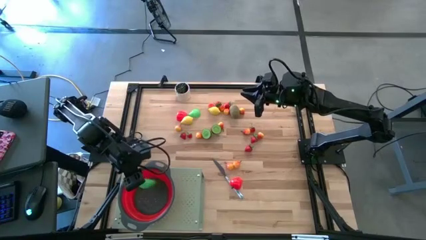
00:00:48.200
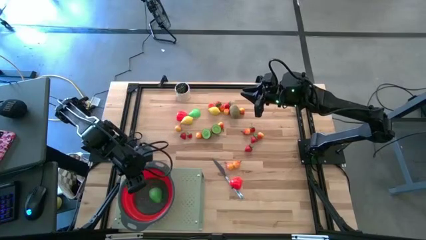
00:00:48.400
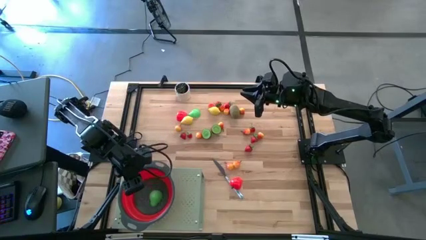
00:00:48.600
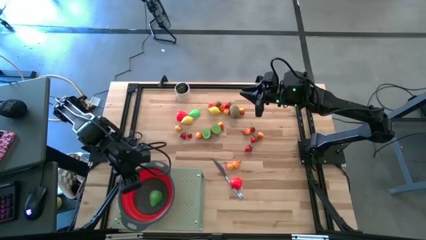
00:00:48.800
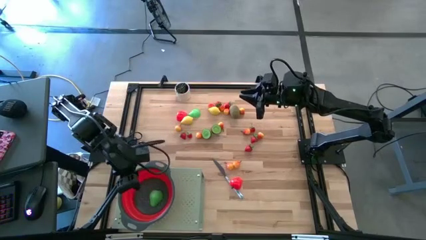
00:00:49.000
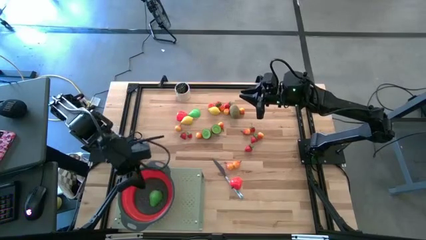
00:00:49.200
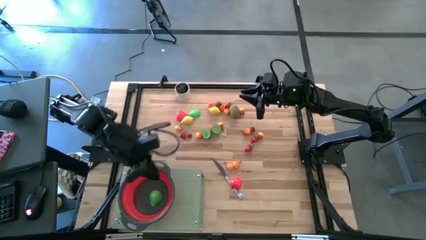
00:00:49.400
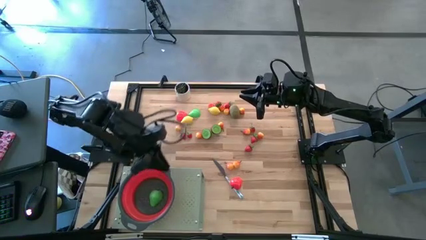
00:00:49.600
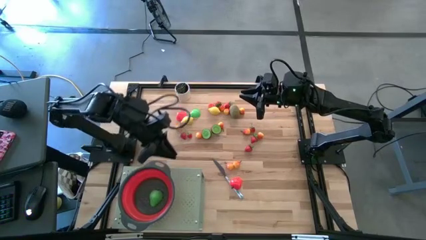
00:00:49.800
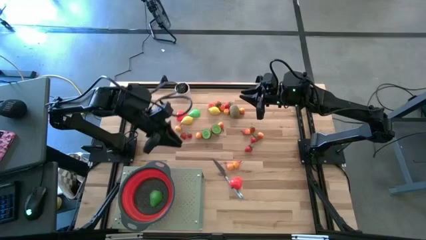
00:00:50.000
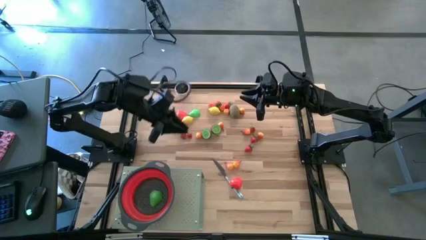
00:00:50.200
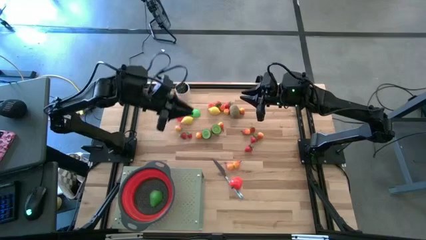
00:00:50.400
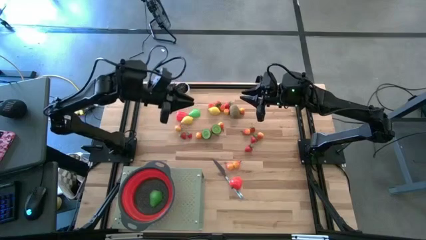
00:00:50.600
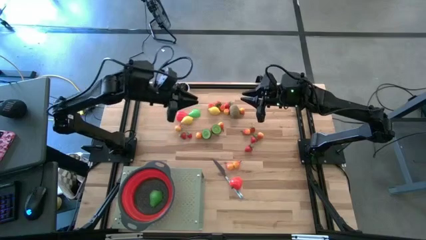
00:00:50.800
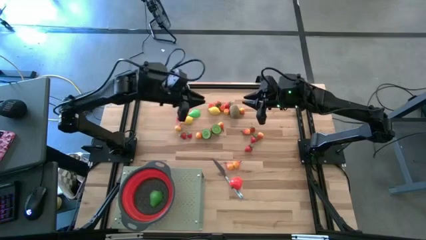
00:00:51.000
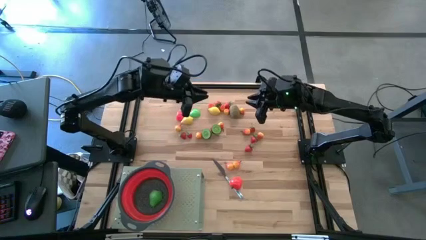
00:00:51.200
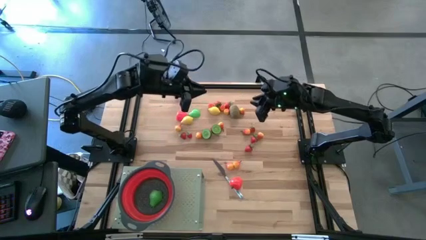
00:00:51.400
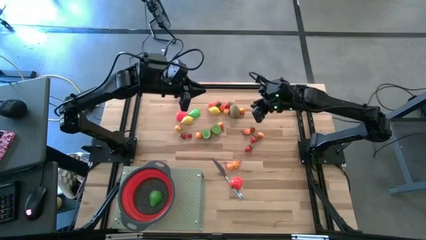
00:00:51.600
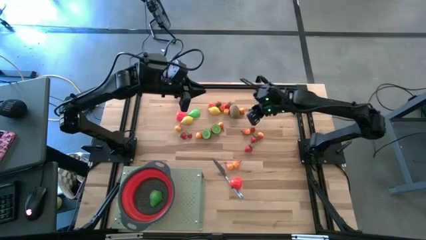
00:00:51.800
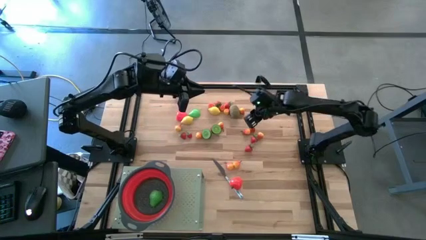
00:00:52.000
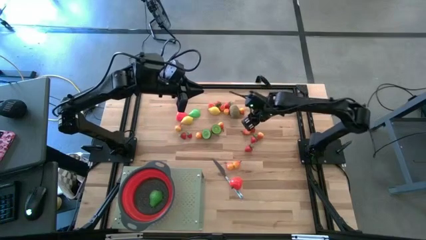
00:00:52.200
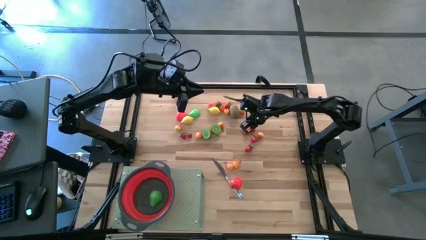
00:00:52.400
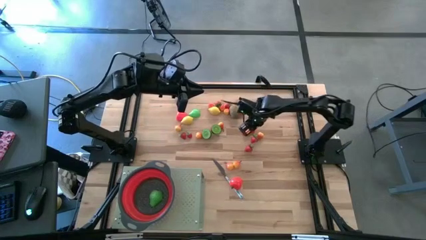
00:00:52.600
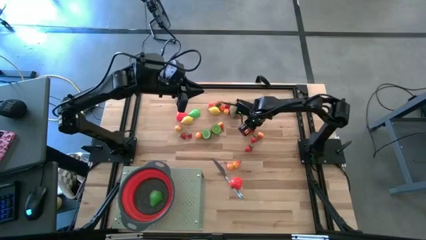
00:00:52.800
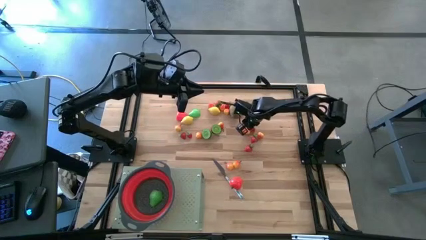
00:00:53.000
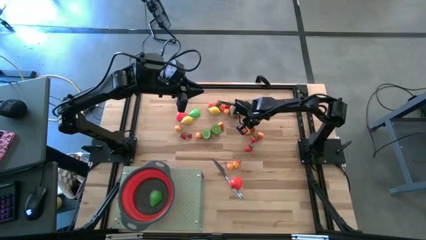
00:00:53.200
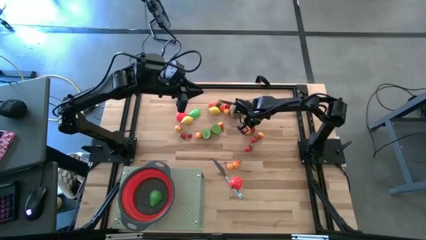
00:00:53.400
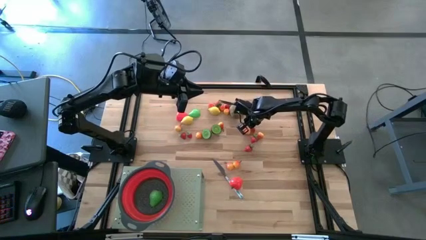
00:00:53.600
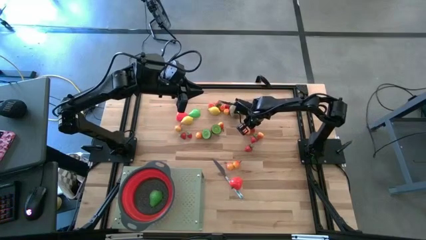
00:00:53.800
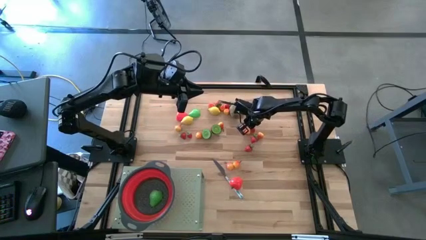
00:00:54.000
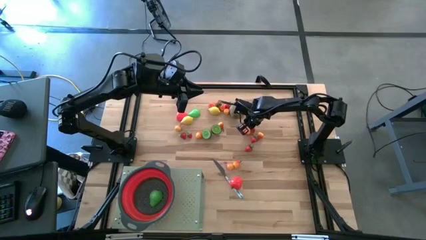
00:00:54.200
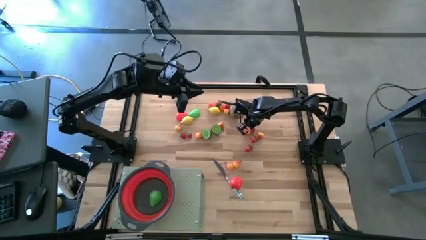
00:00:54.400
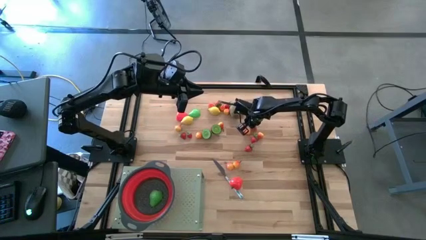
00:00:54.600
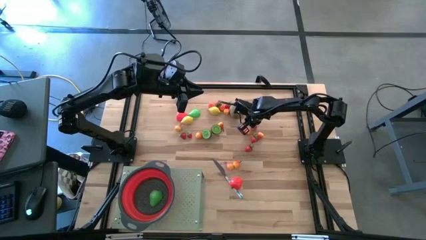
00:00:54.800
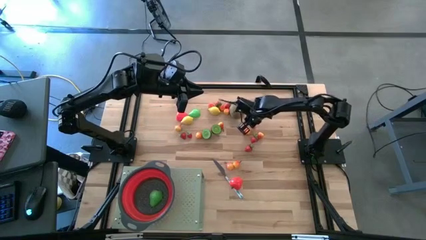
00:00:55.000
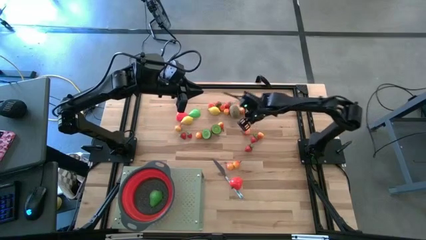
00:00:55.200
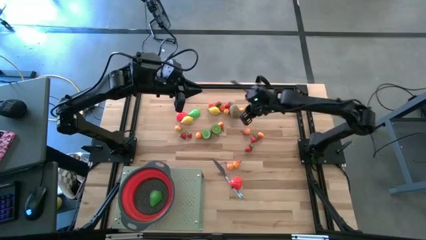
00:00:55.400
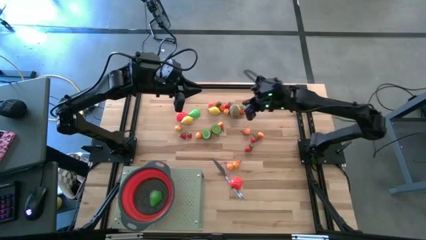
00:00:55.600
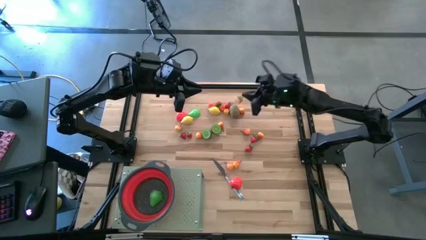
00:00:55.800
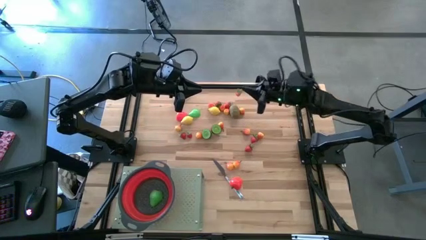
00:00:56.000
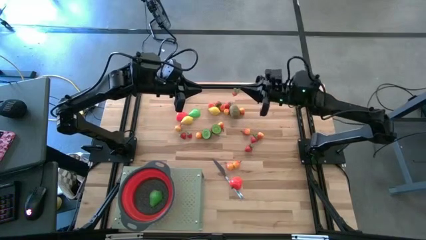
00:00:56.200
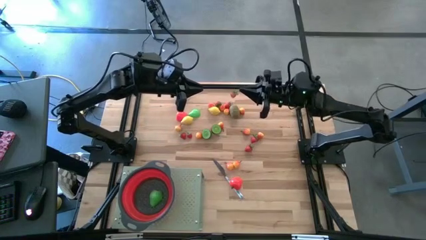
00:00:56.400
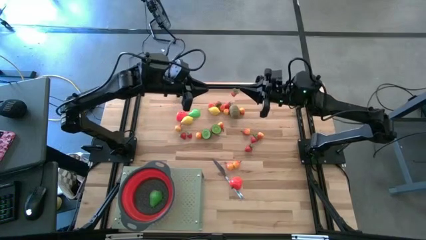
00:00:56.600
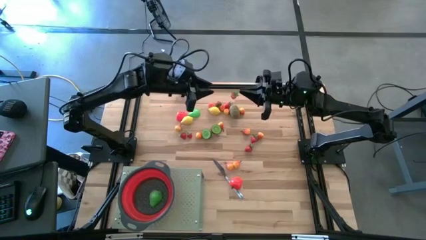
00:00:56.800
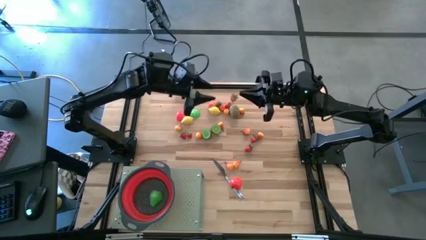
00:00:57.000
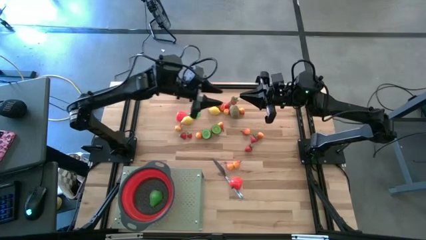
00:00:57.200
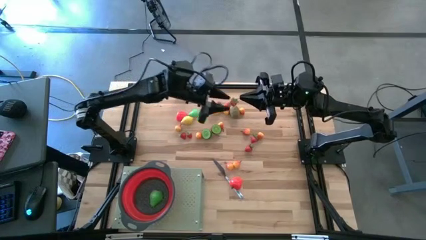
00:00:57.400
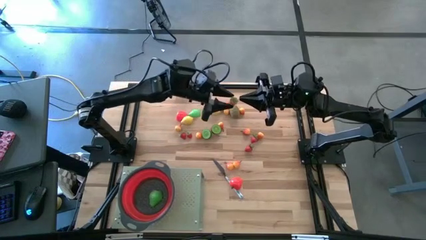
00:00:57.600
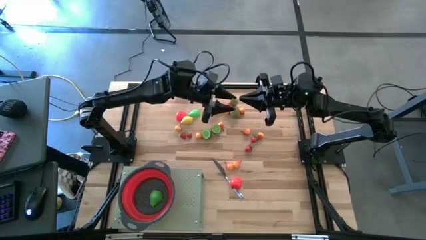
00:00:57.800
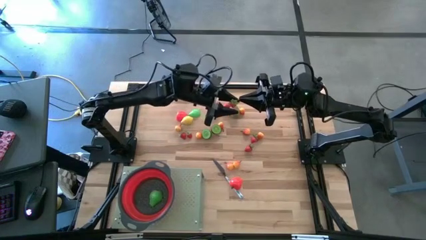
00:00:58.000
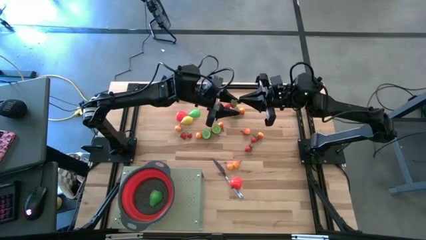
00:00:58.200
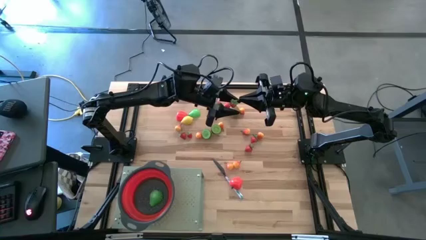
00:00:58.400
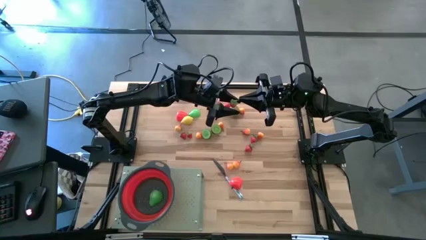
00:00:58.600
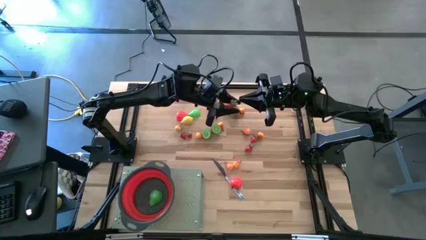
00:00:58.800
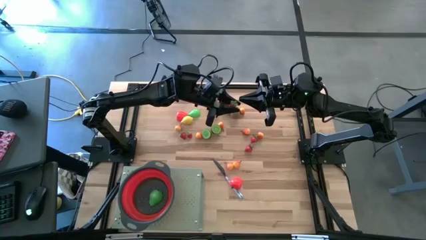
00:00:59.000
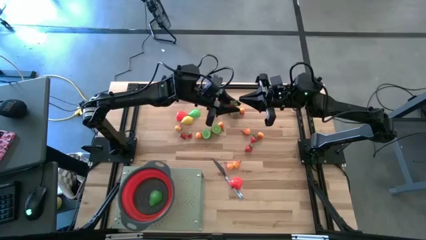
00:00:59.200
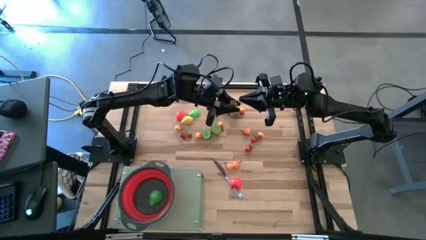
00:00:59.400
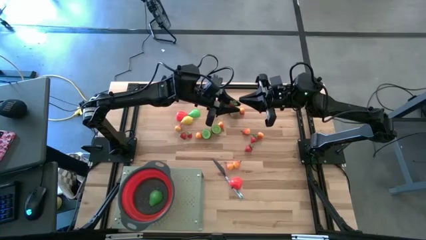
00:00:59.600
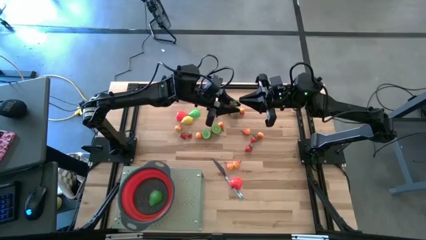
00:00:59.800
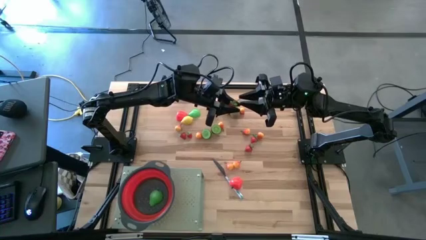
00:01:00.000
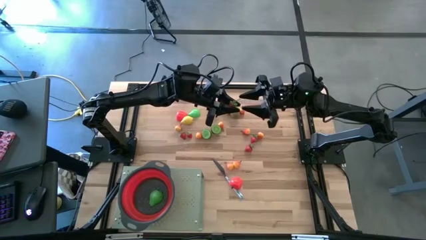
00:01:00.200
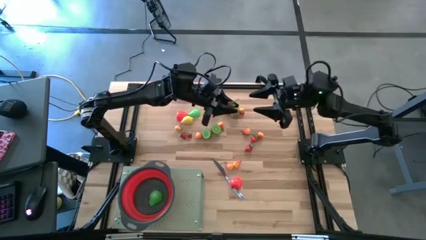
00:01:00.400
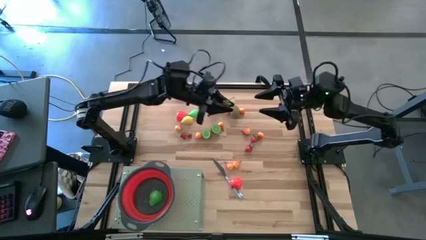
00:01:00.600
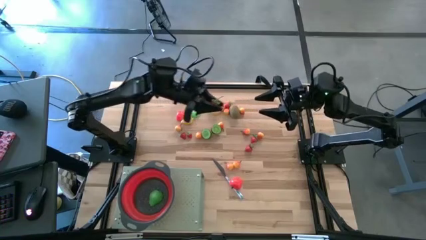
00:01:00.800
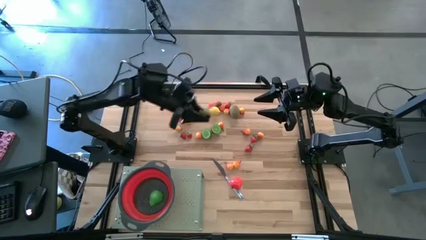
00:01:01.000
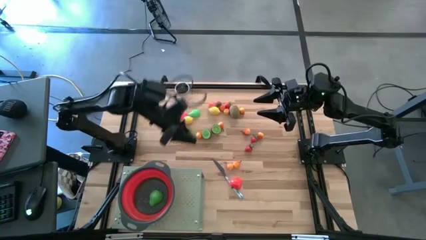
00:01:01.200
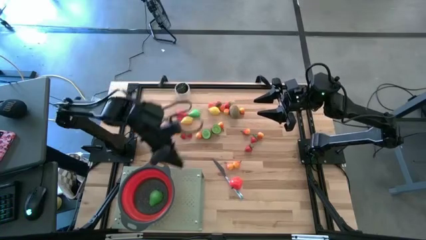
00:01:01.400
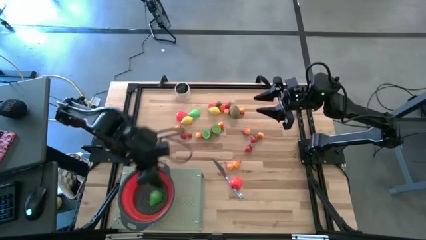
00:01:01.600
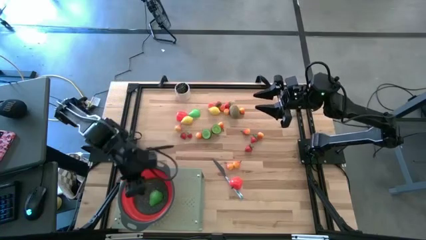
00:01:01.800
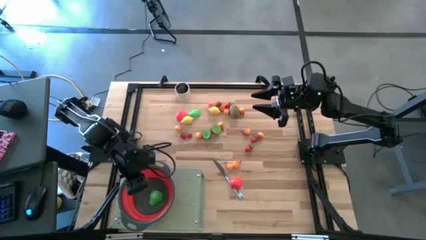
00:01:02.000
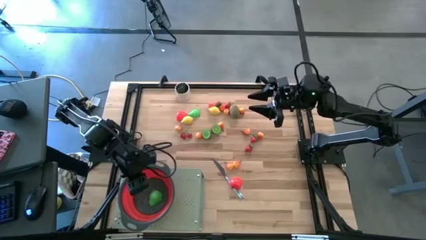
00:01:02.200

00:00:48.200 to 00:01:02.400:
Task: Pick & Place Fruit
Put the strawberry into the red strainer bowl on the shelf

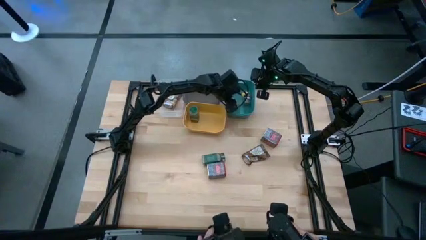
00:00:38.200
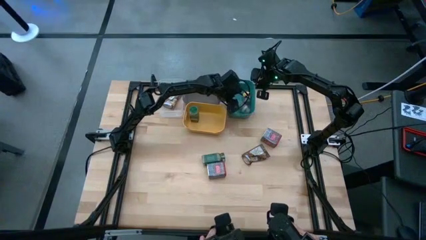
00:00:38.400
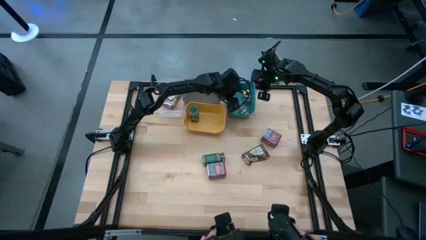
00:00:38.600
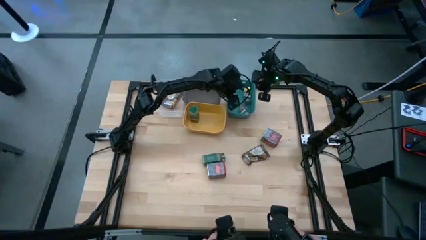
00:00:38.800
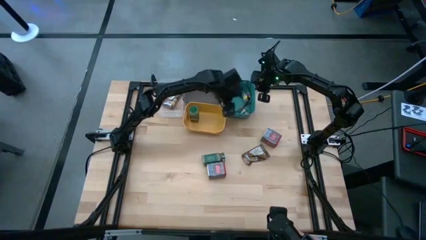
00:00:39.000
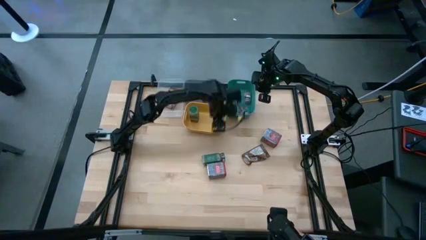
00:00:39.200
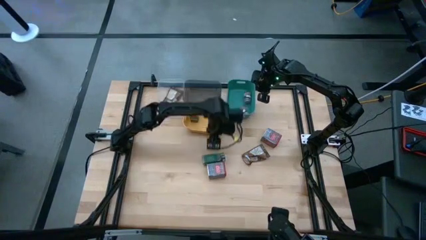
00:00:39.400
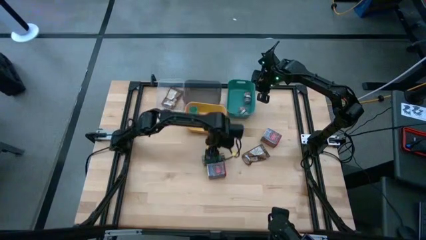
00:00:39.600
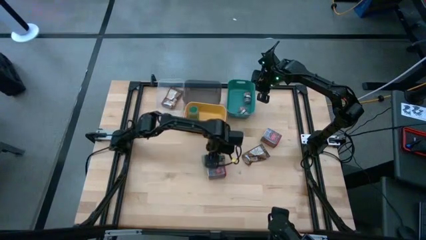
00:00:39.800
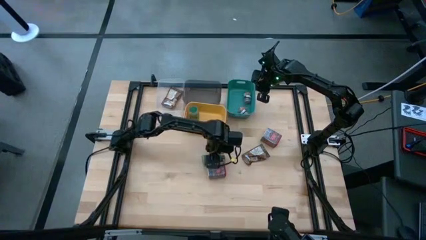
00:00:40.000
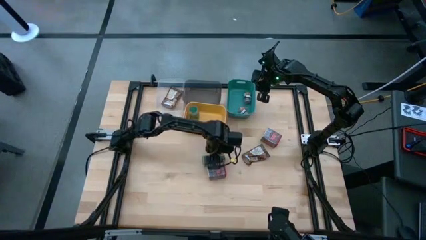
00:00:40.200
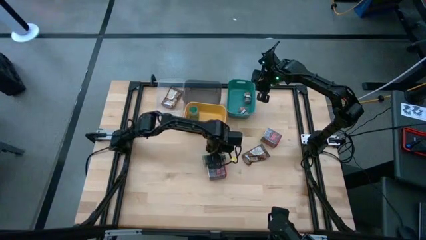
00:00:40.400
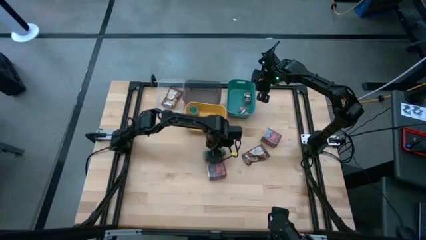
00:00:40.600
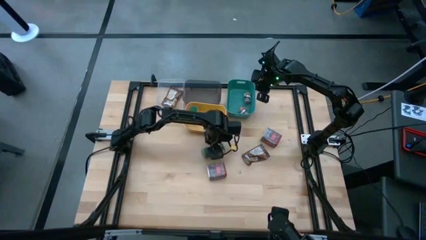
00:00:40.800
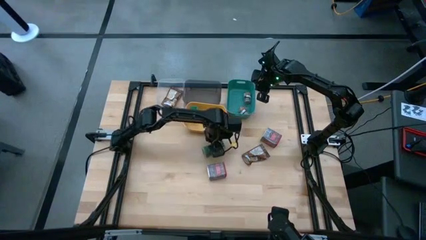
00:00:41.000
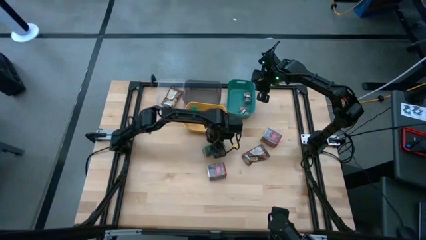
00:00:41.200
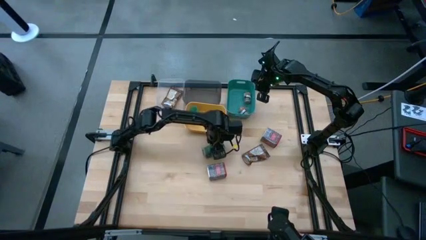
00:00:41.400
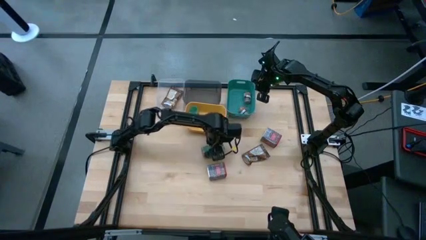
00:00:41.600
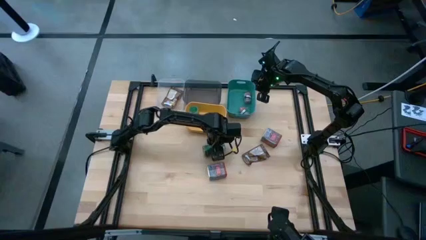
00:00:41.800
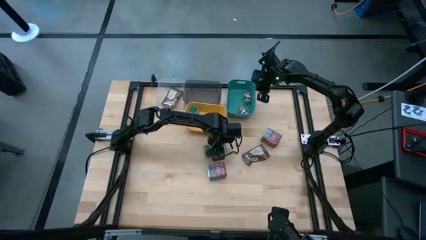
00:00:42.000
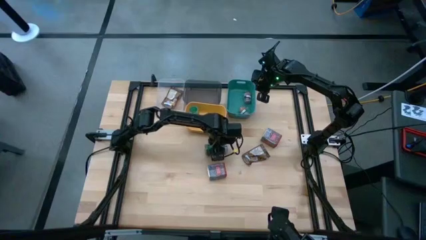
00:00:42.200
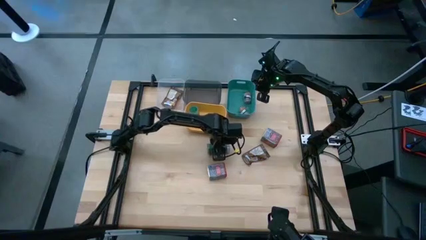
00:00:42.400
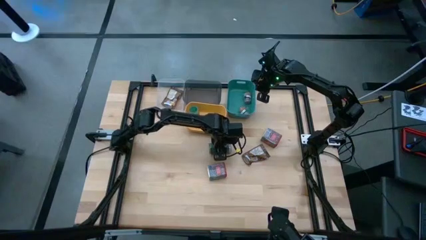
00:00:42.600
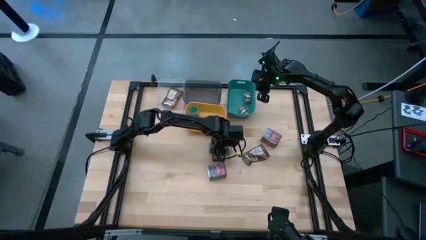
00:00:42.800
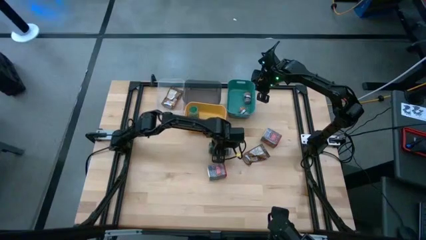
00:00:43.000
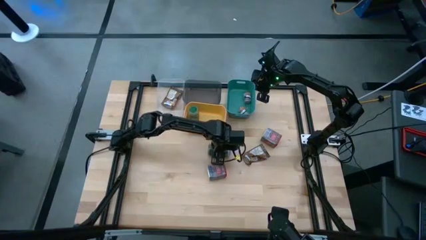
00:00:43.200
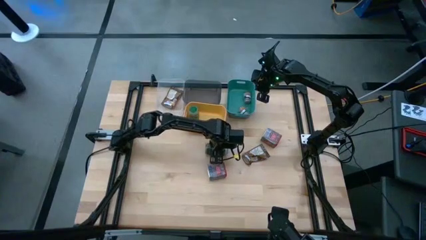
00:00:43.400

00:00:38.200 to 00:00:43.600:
Task: Sort spices by type
Put the green seasoning bottle into the yellow bin
